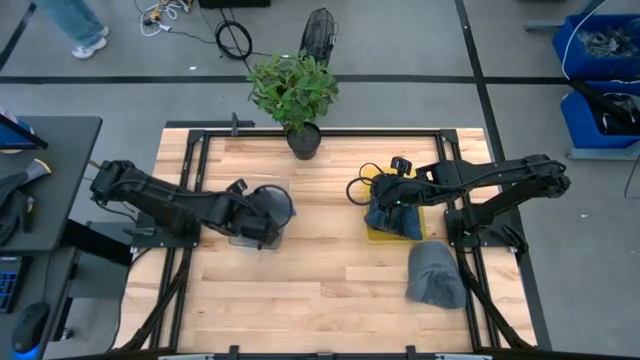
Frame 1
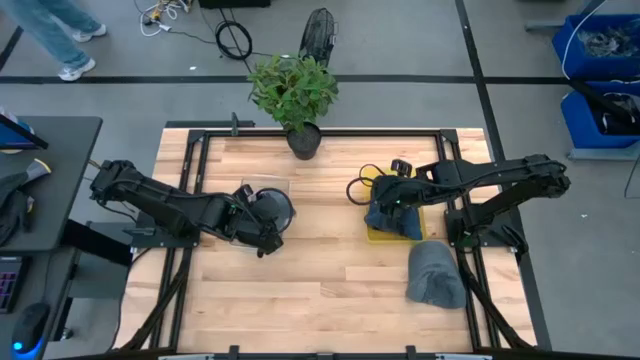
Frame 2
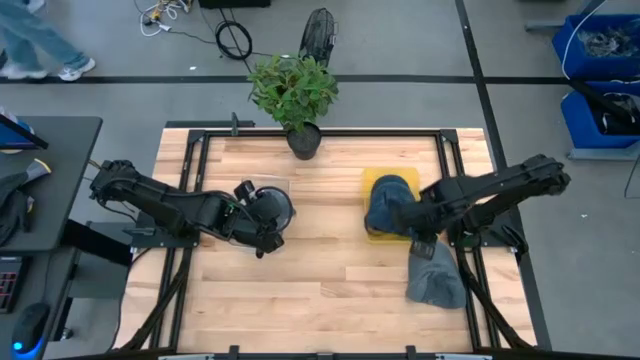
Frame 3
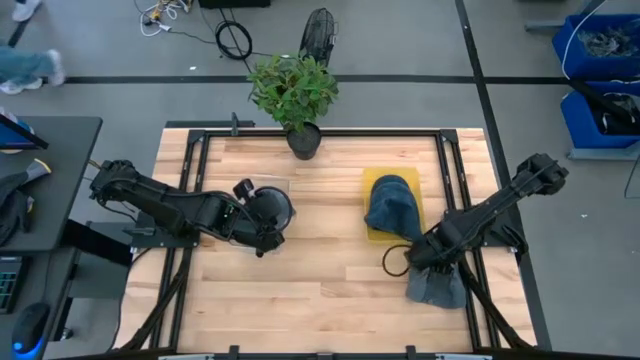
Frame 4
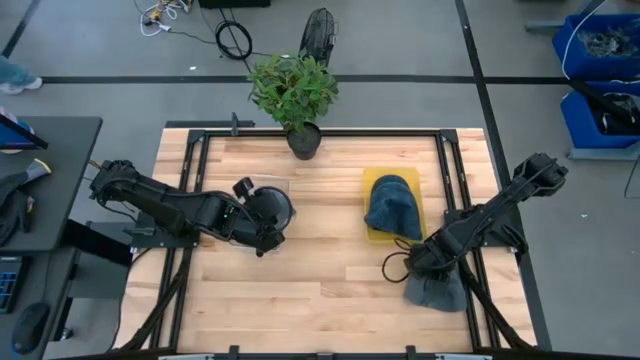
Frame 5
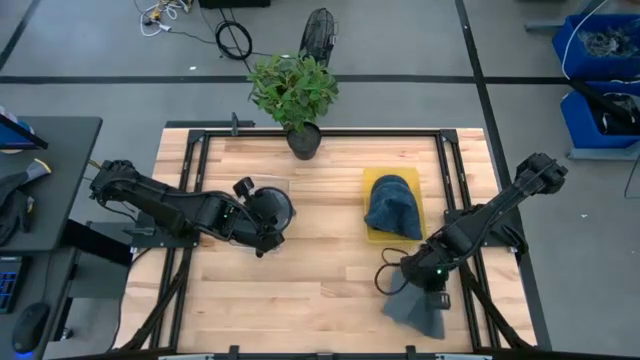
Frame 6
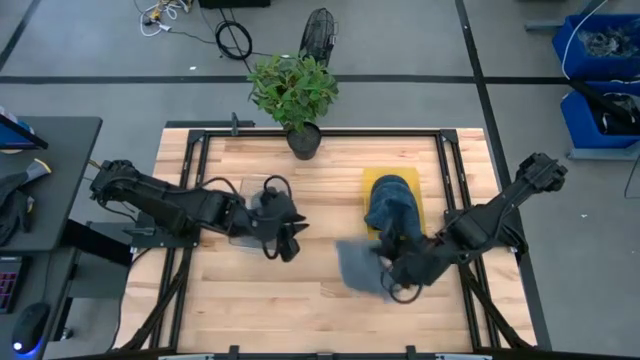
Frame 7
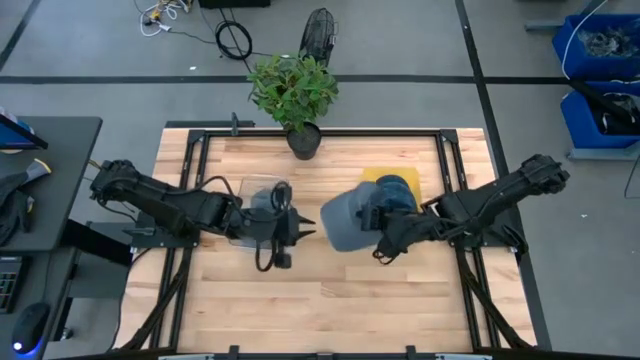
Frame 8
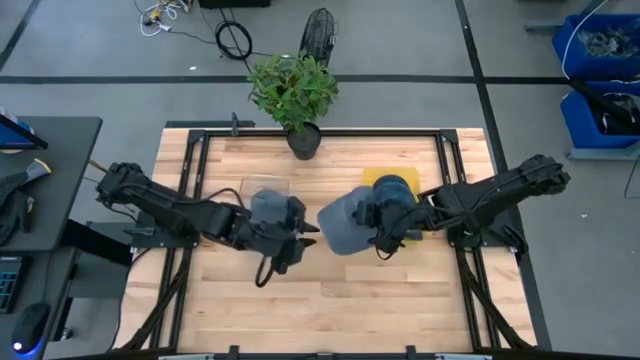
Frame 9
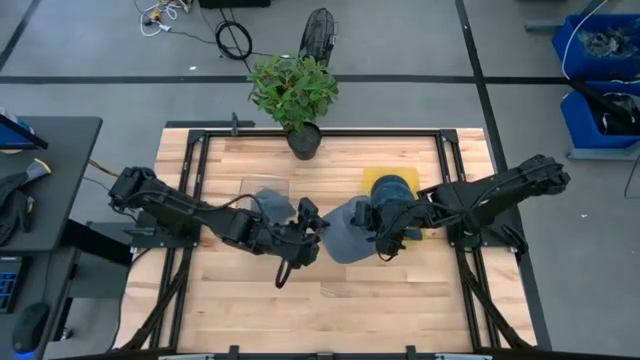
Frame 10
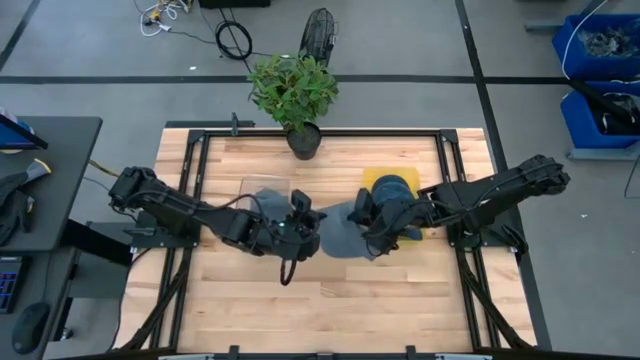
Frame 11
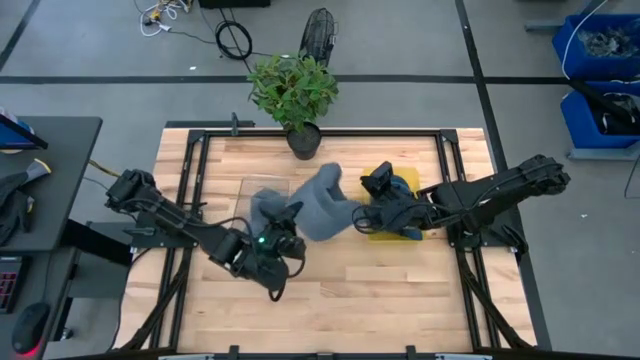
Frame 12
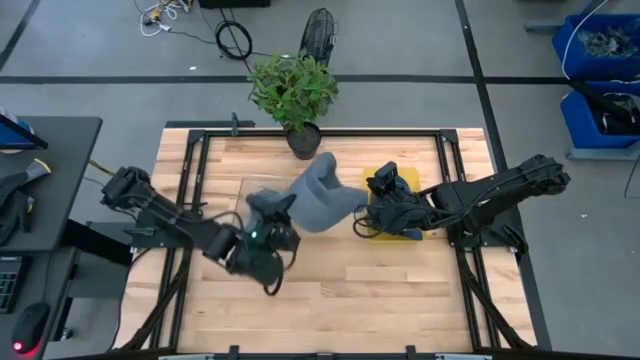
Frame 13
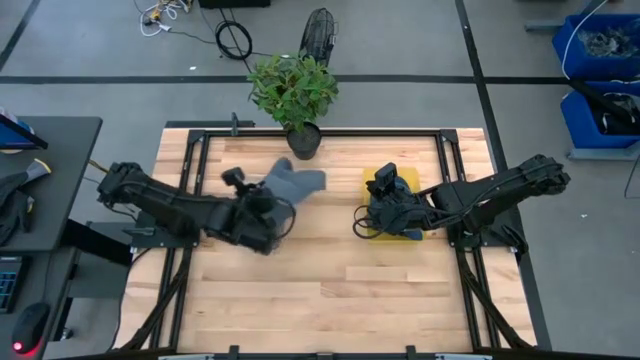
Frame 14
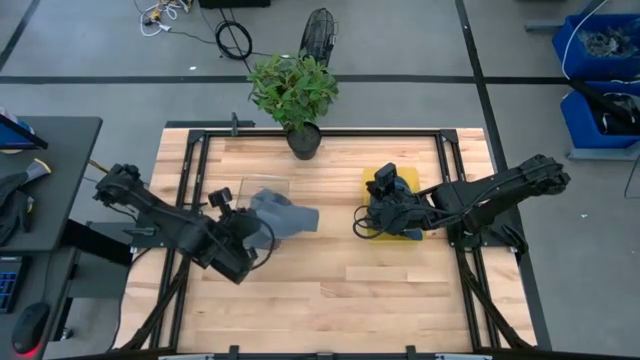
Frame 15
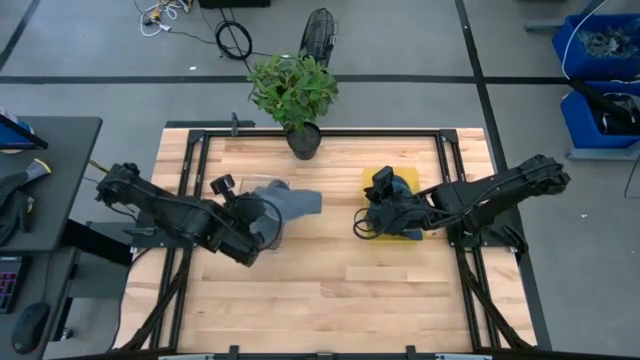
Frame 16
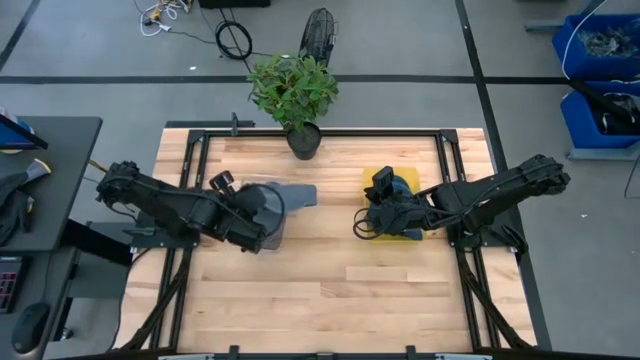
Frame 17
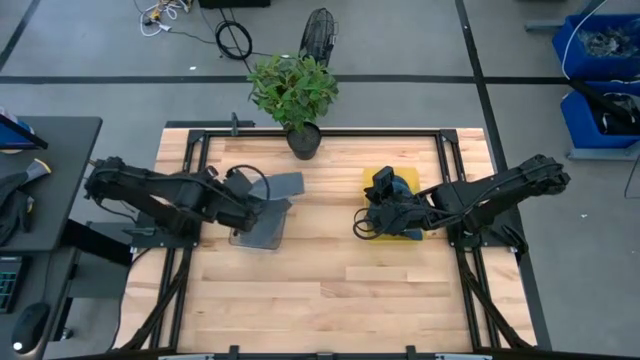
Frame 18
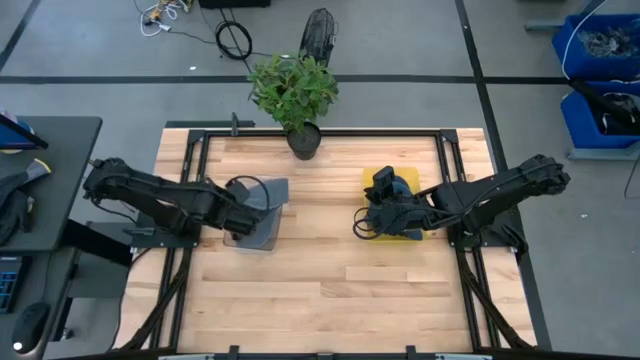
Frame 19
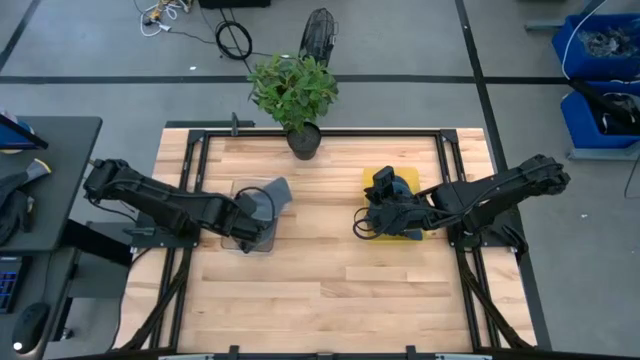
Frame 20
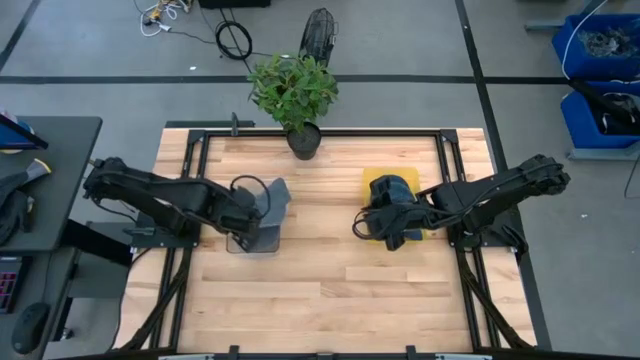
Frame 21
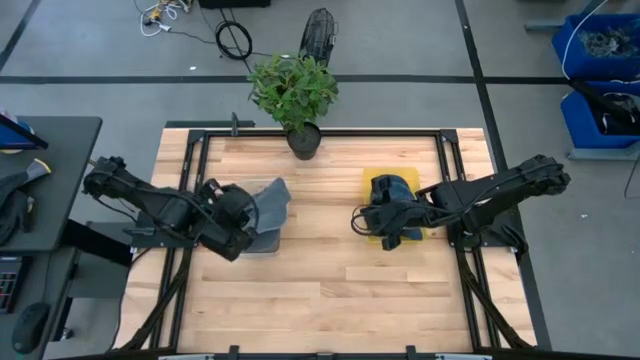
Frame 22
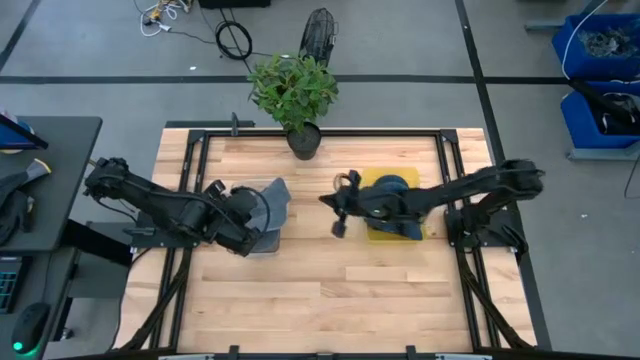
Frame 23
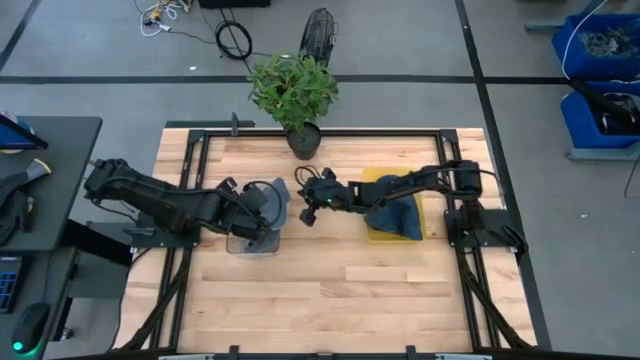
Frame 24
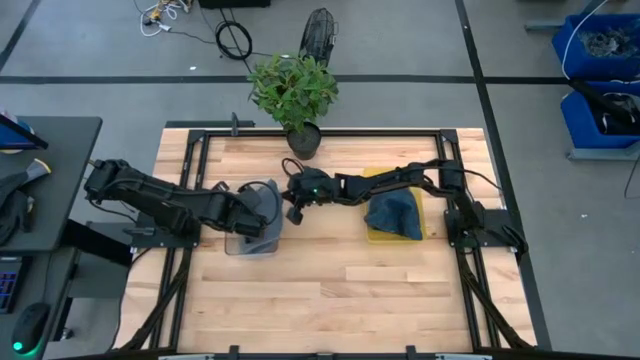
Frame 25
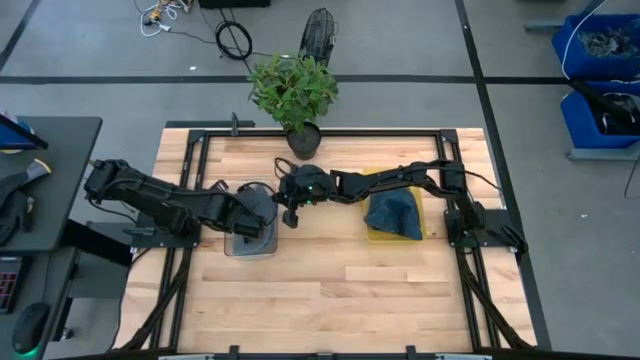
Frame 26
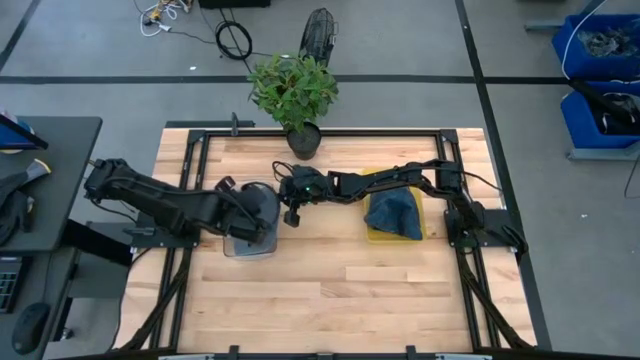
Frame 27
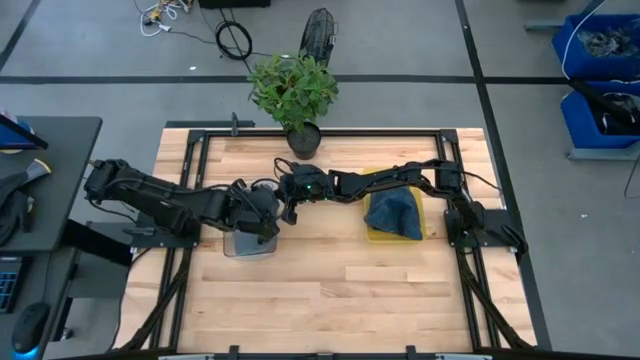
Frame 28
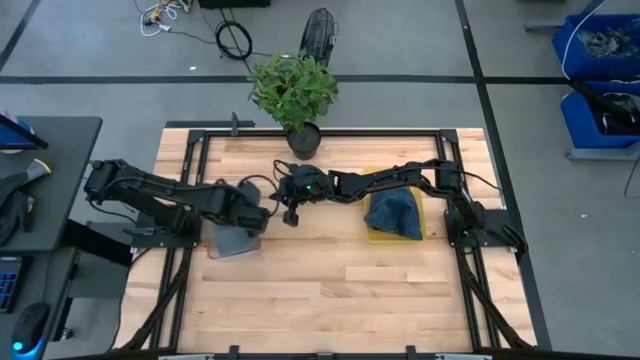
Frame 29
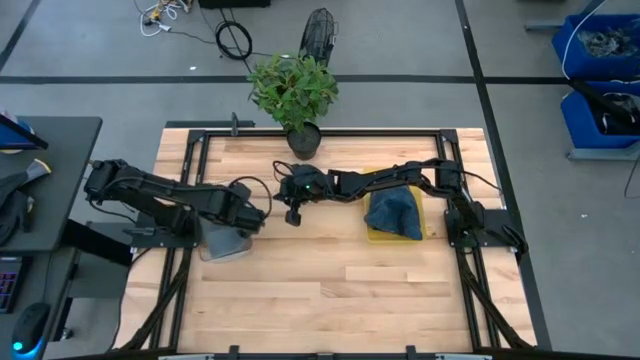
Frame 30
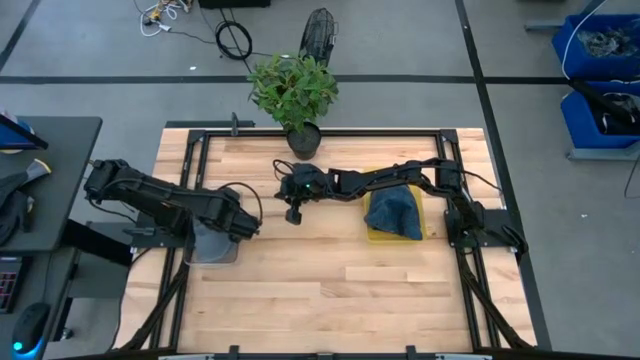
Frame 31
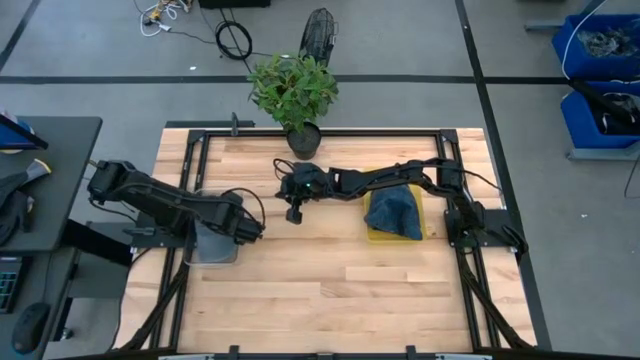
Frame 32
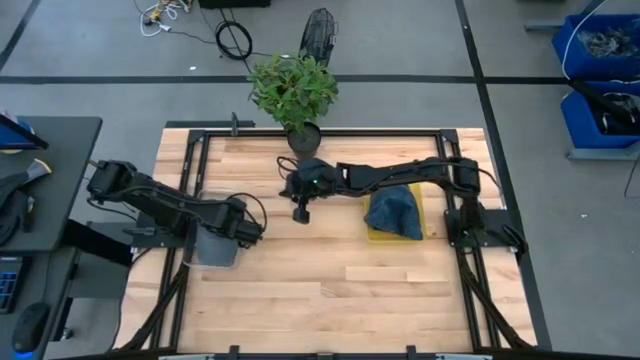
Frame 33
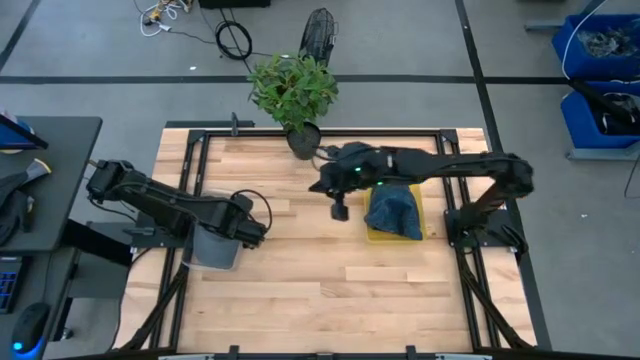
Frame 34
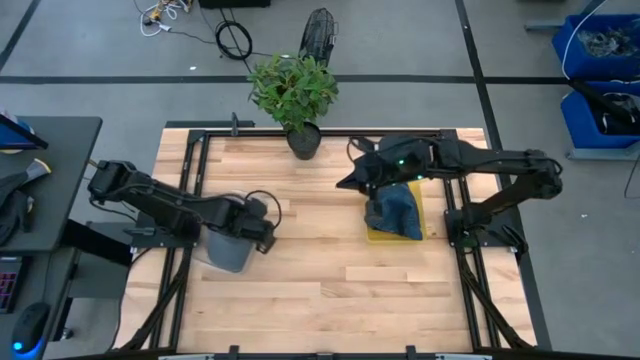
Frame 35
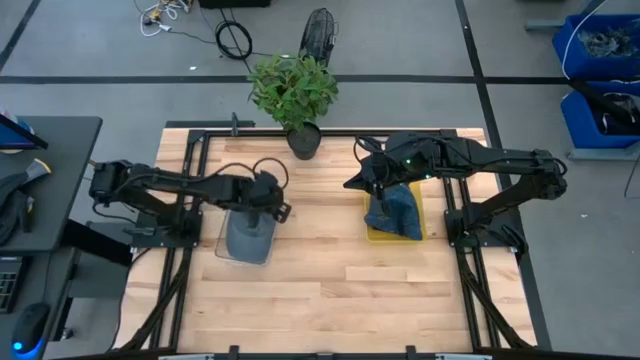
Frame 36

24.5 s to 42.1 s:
Task: Pick & Place hat
Put the gray cap into the transparent bin
